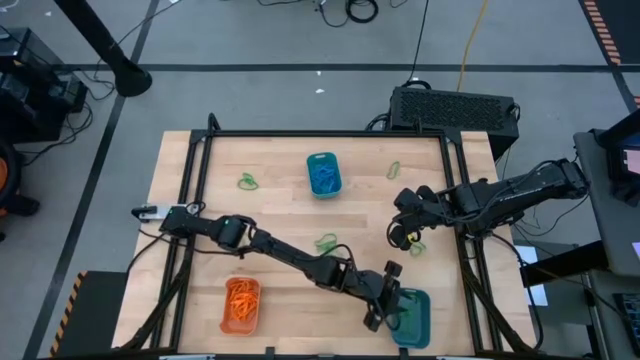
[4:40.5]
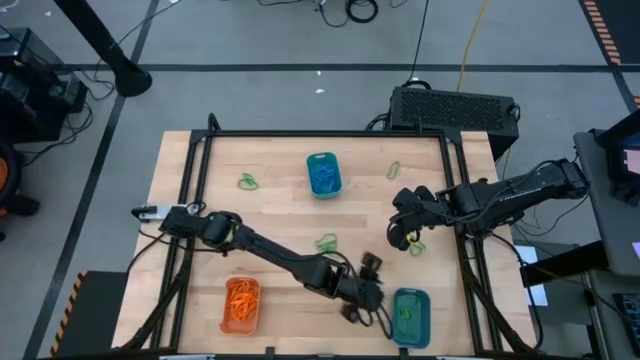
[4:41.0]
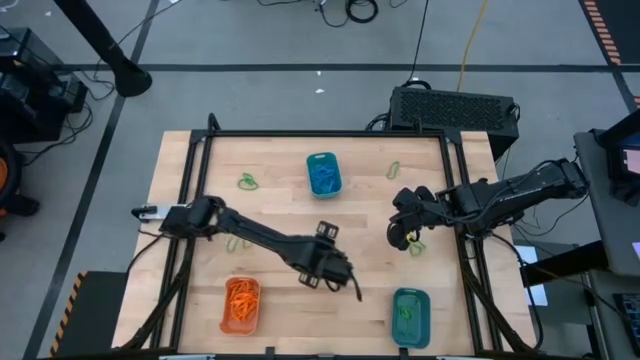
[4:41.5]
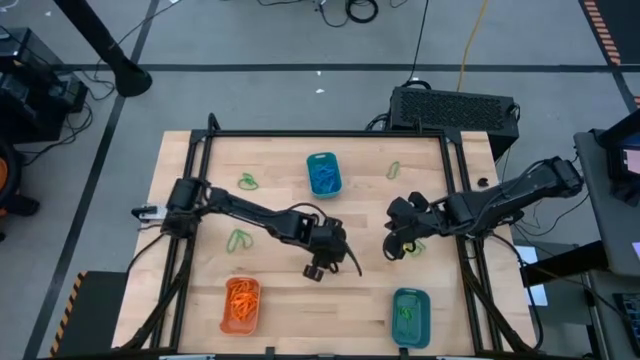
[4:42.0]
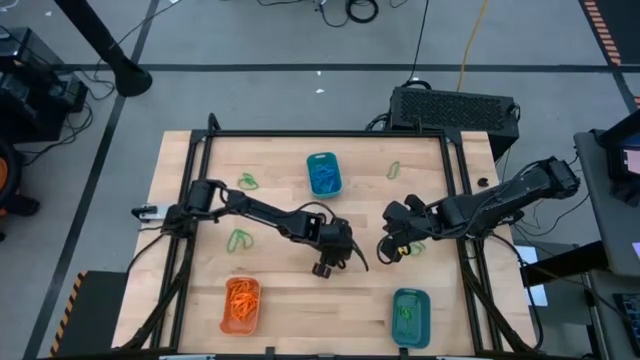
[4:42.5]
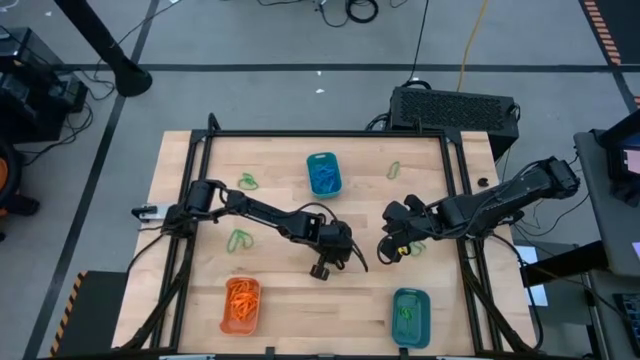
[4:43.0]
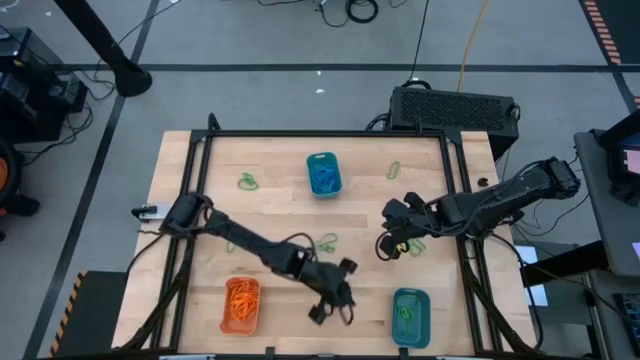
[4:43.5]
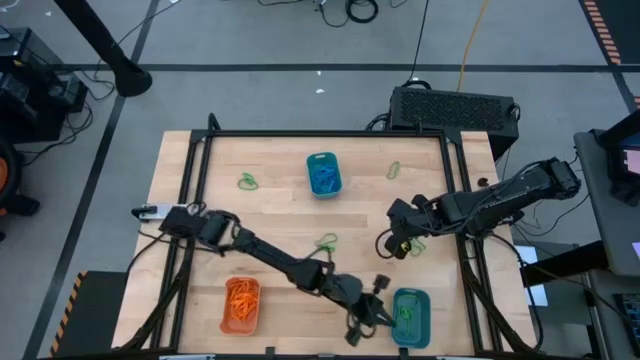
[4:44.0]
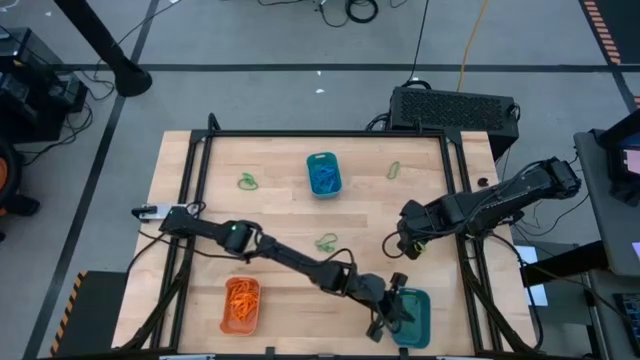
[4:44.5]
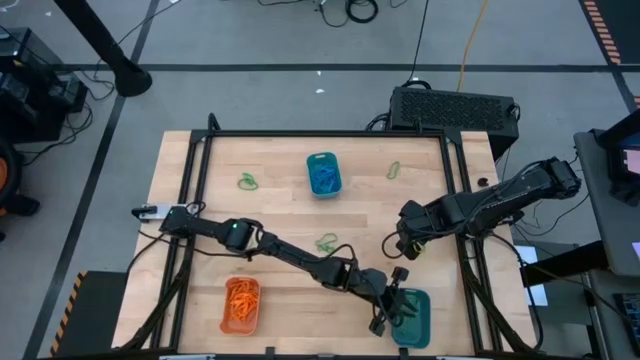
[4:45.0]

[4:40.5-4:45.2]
Task: Sort rubber bands into baskets
Put the green rubber band into the bottom bin

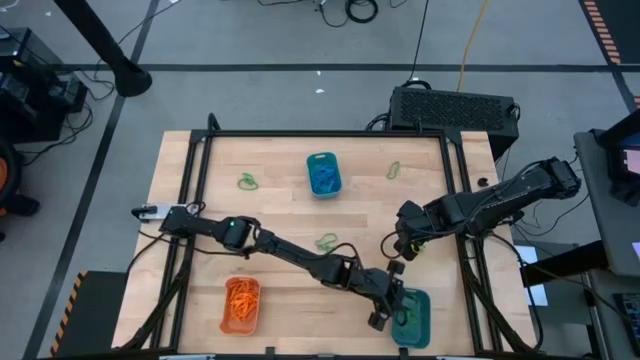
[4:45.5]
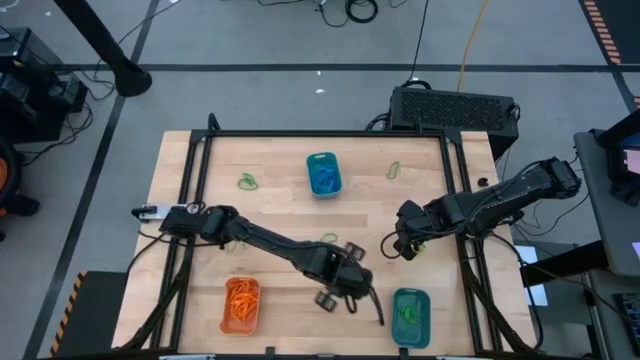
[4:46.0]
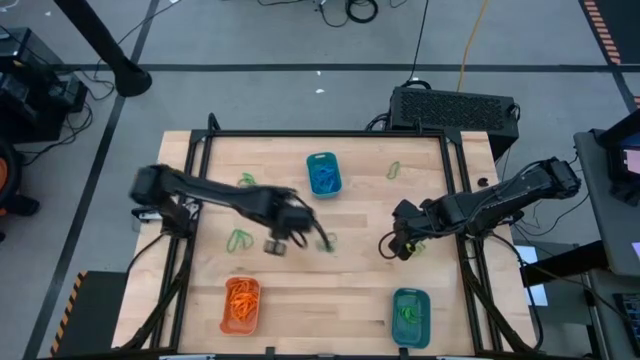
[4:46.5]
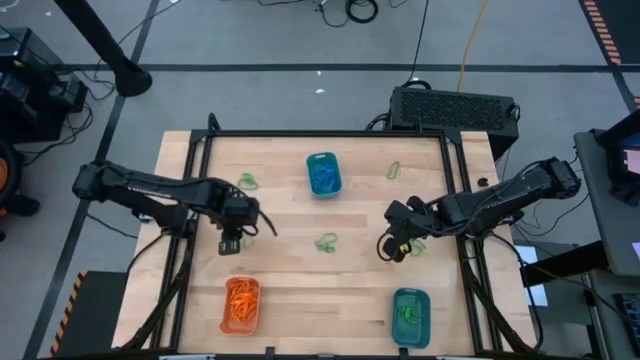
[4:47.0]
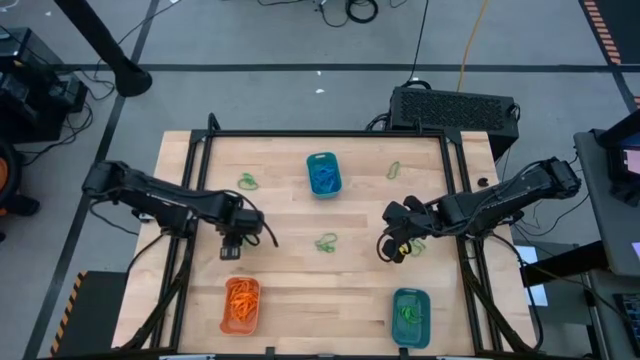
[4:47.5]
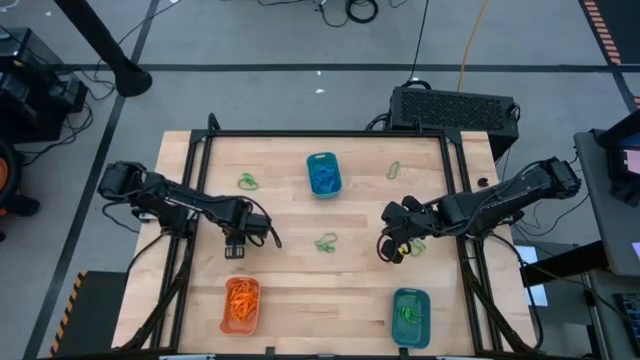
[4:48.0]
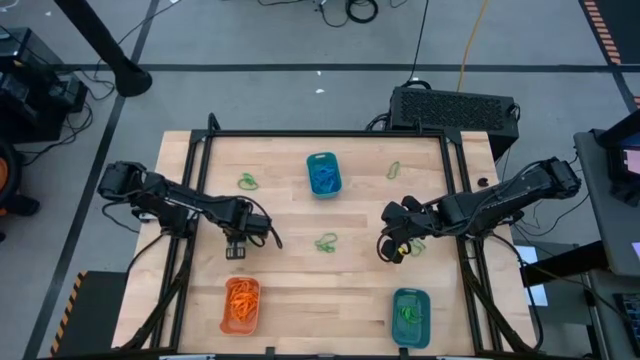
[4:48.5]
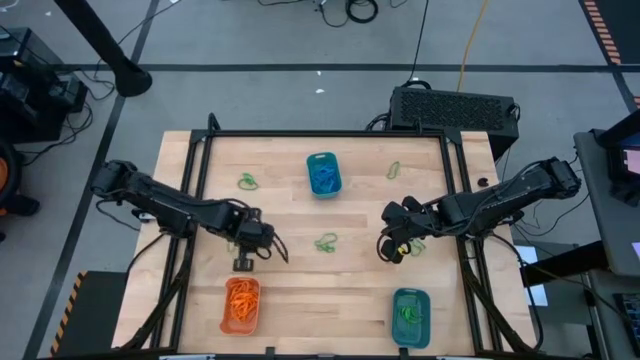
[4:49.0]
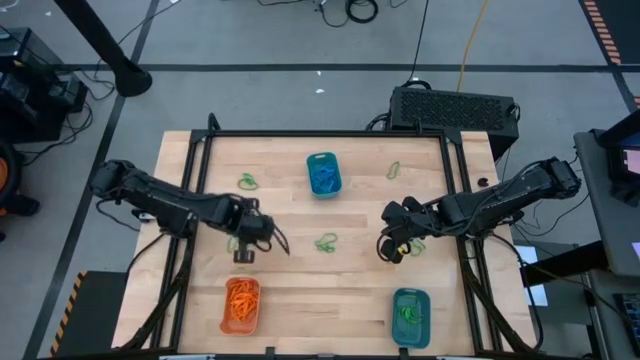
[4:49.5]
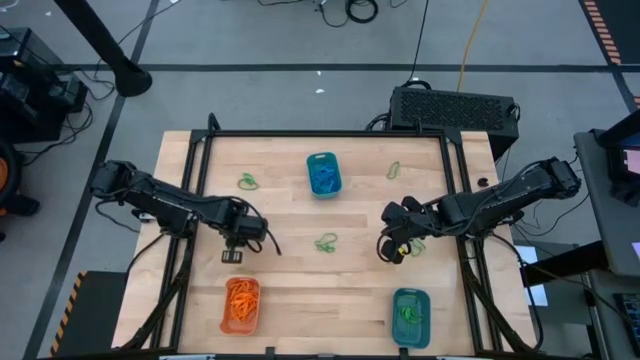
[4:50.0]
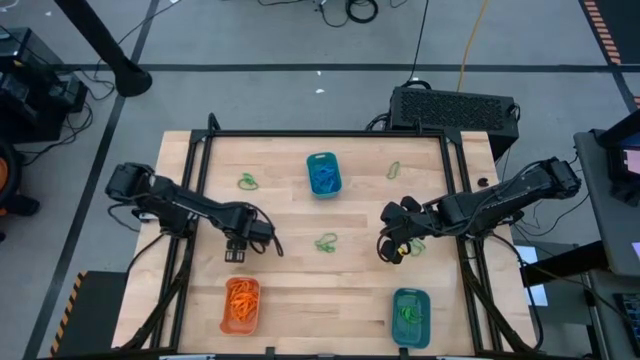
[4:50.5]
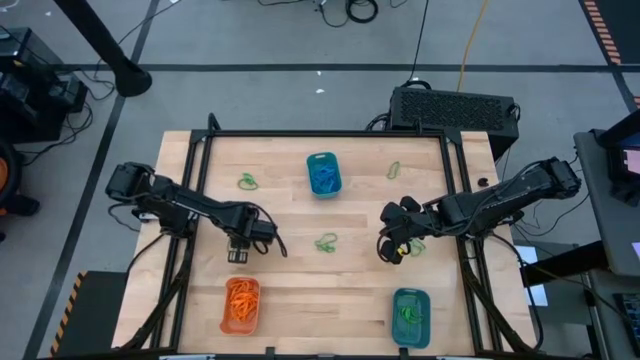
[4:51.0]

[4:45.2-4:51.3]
Put the green rubber band into the bottom bin

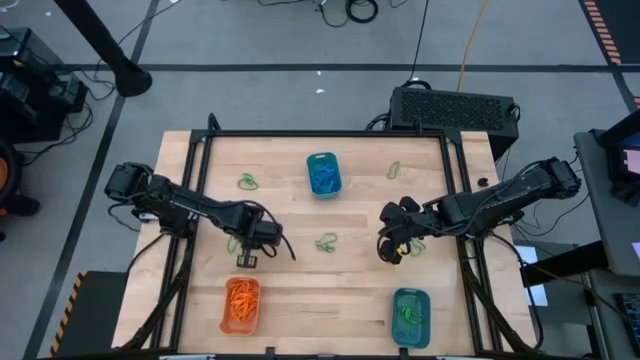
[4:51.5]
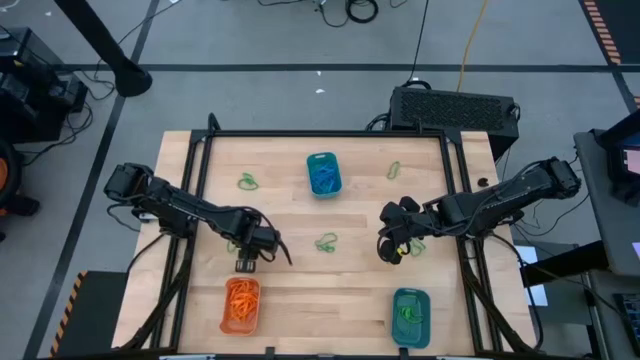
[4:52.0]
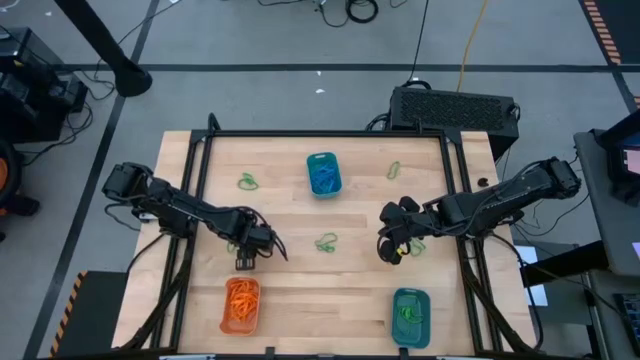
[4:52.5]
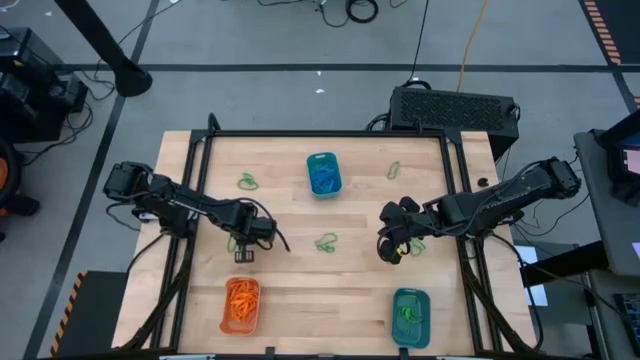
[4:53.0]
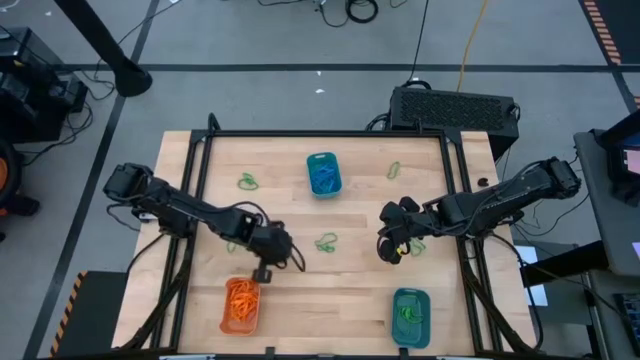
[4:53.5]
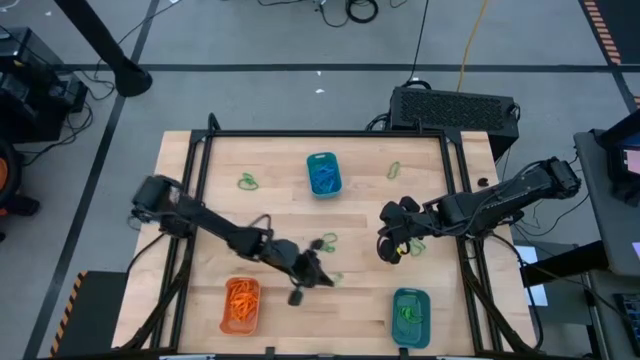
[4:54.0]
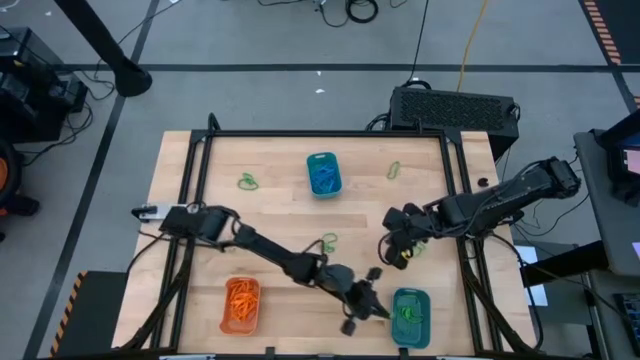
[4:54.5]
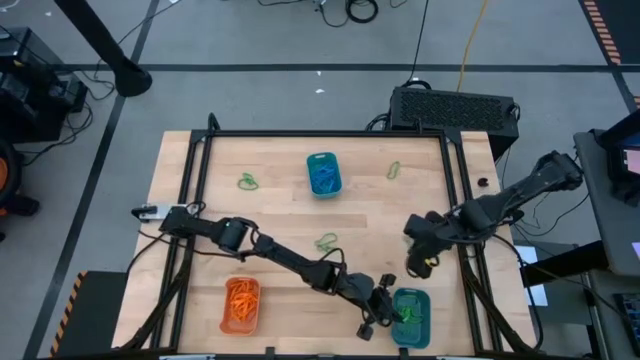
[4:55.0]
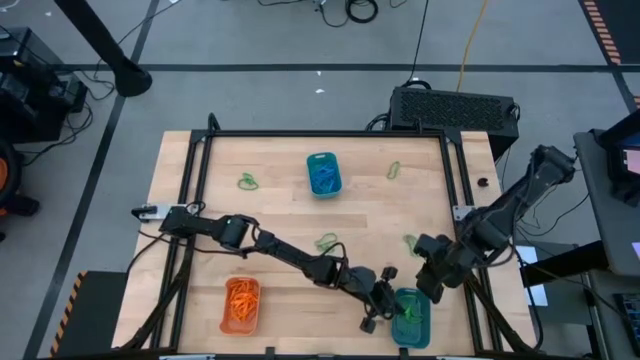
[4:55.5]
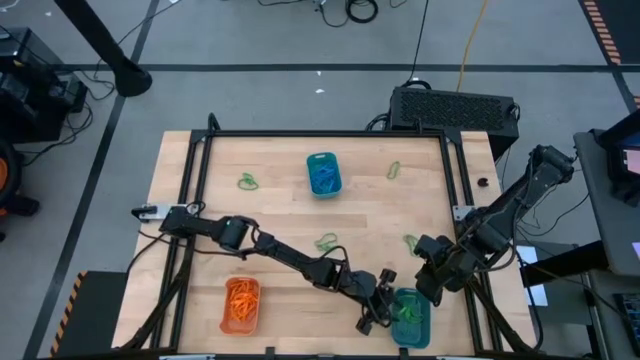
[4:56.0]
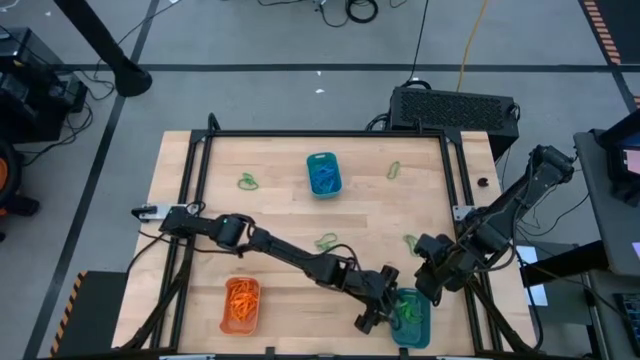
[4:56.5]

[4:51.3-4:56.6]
Put the green rubber band into the bottom bin

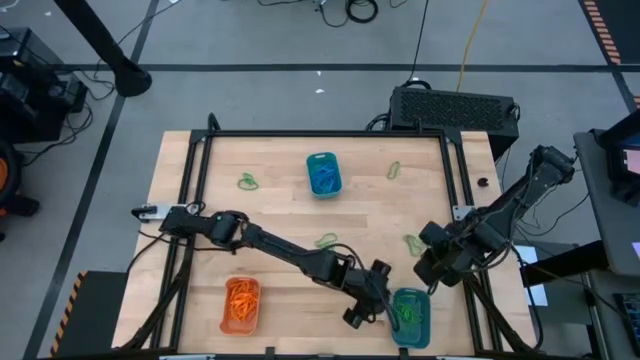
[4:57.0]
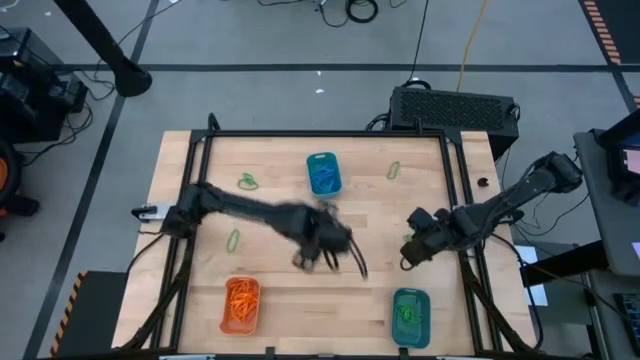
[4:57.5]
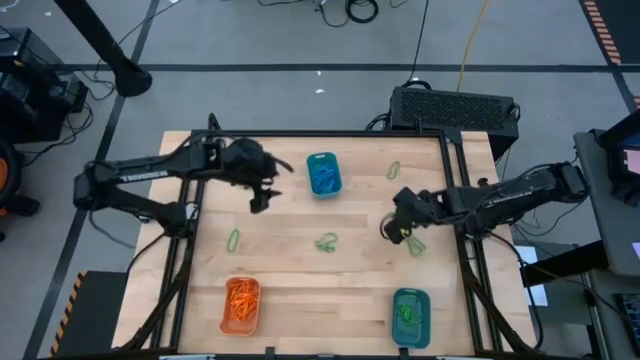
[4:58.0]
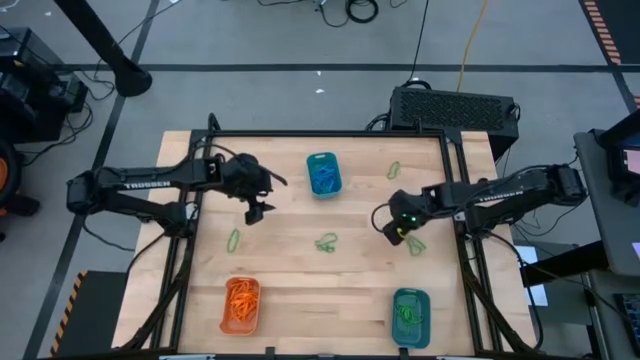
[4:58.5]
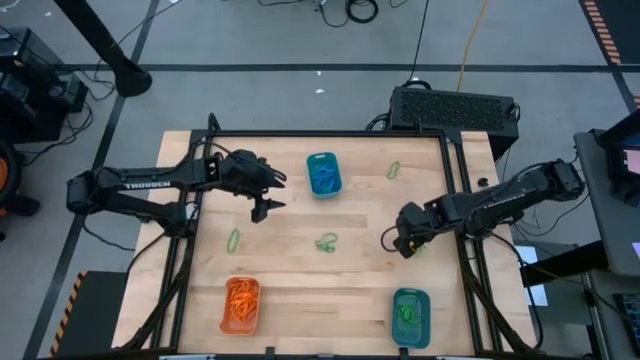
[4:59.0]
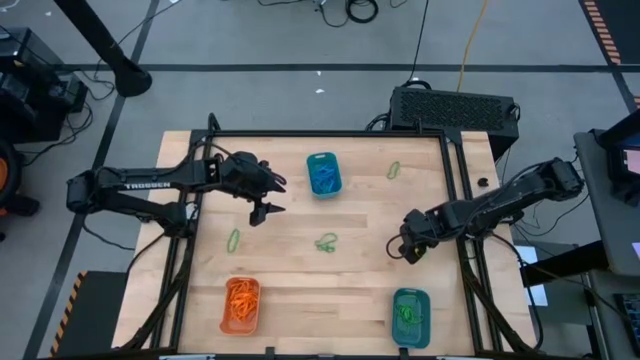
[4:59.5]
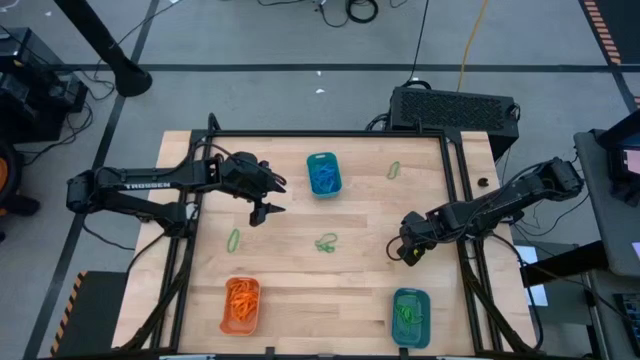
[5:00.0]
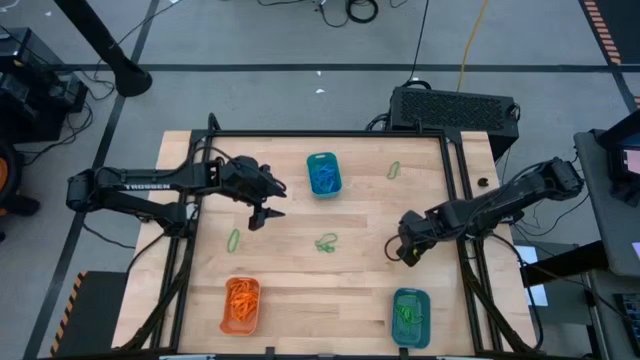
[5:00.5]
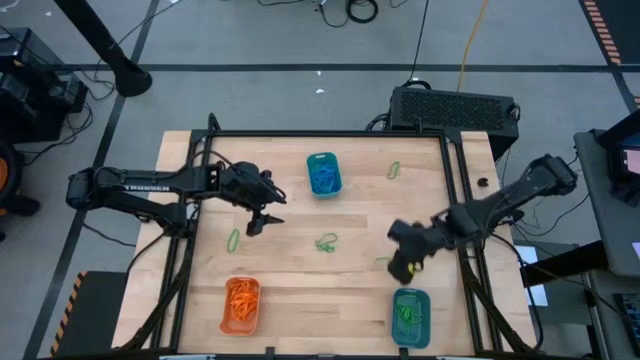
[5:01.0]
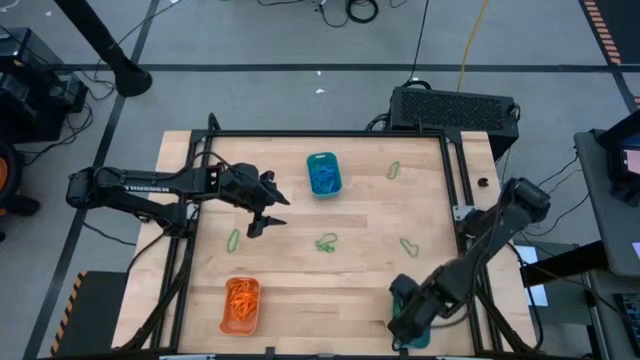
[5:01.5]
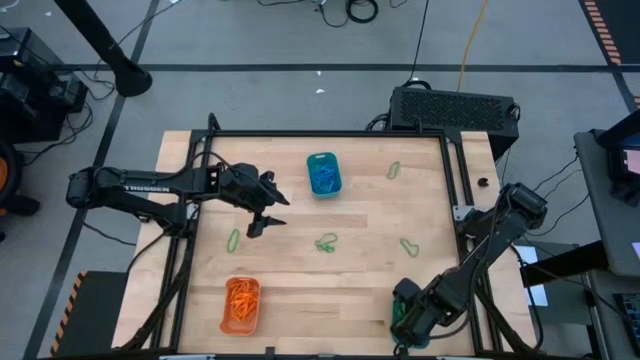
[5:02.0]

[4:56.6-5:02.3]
Put the green rubber band into the bottom bin
